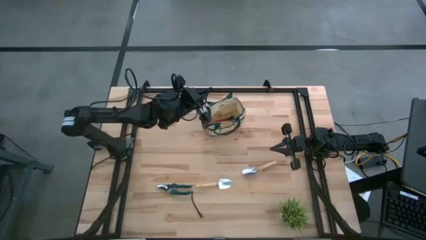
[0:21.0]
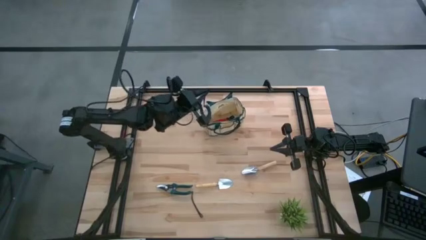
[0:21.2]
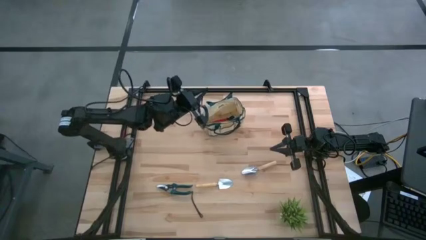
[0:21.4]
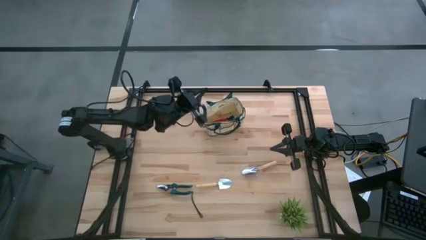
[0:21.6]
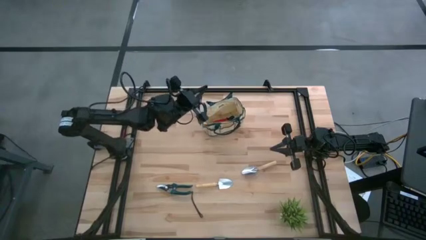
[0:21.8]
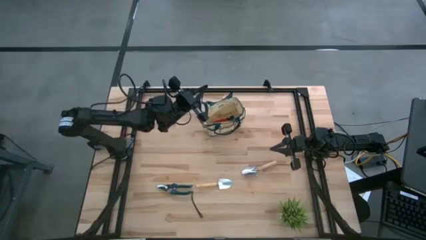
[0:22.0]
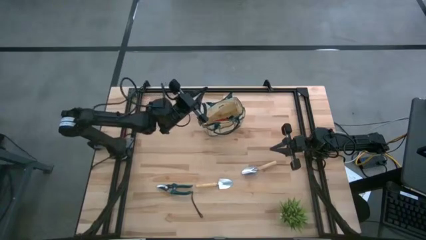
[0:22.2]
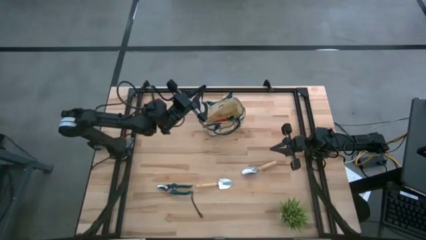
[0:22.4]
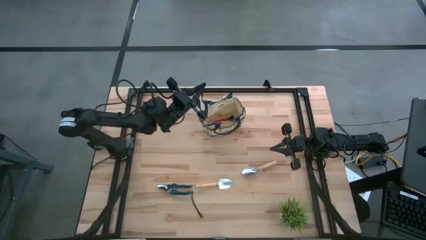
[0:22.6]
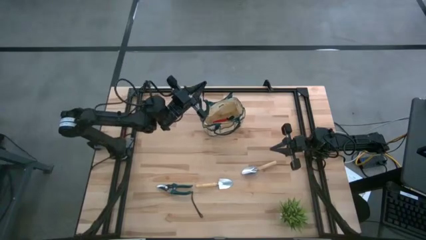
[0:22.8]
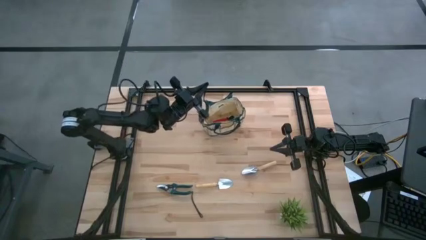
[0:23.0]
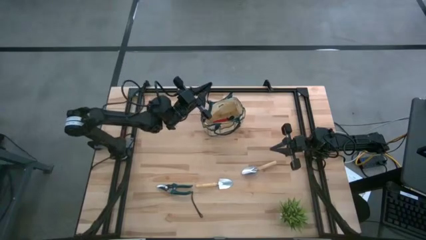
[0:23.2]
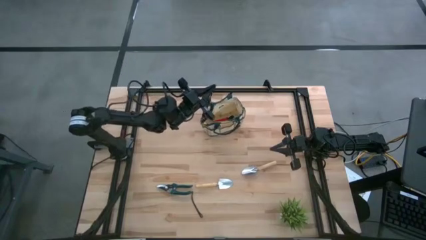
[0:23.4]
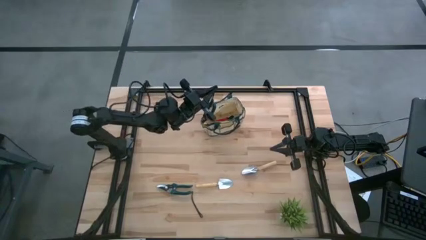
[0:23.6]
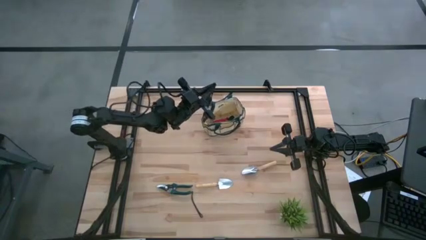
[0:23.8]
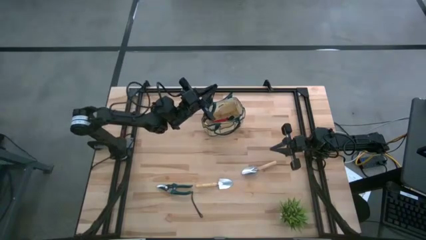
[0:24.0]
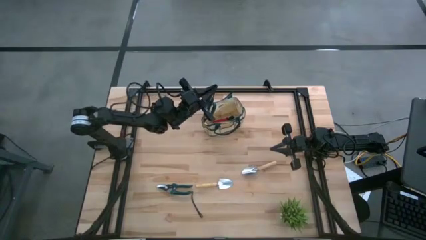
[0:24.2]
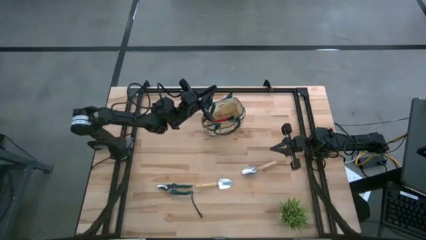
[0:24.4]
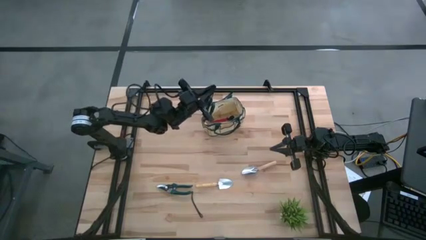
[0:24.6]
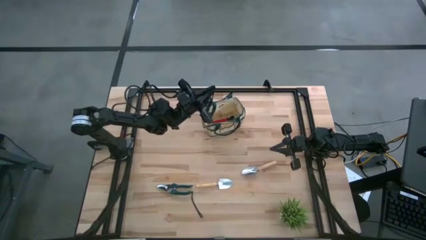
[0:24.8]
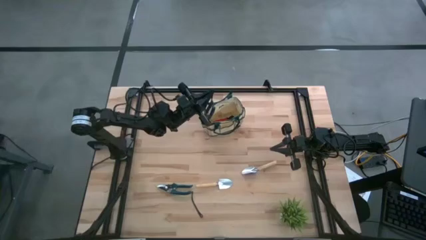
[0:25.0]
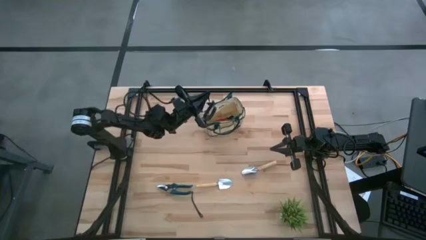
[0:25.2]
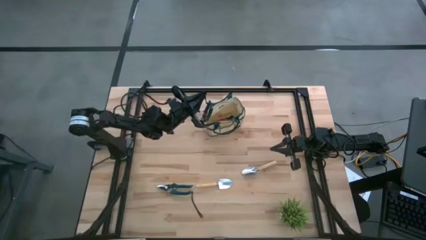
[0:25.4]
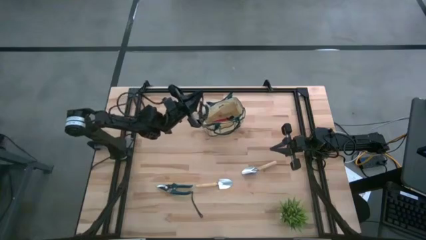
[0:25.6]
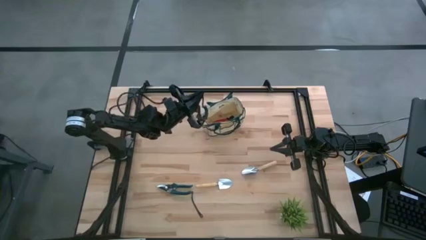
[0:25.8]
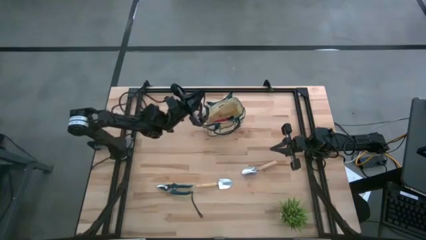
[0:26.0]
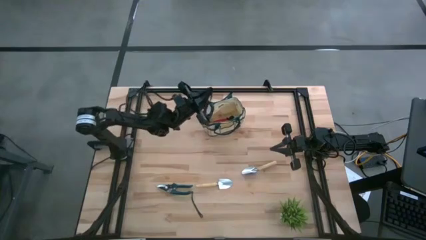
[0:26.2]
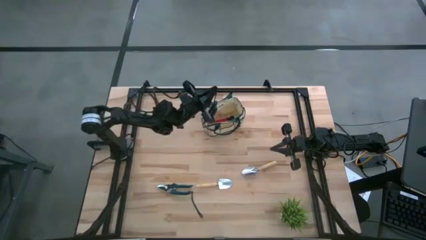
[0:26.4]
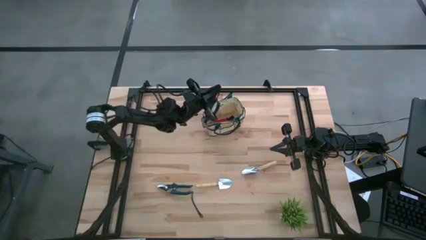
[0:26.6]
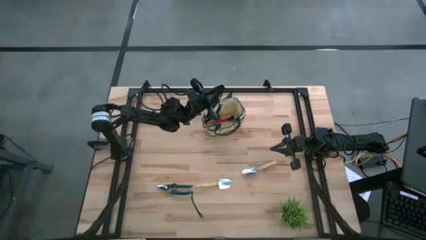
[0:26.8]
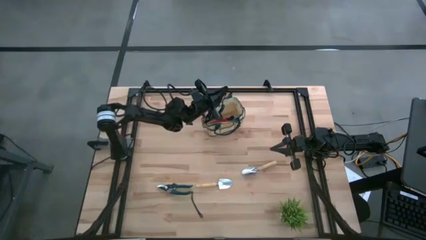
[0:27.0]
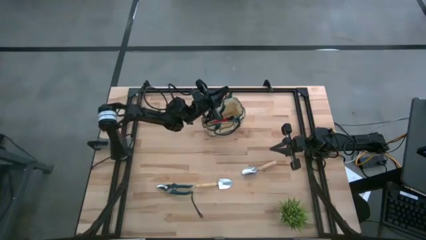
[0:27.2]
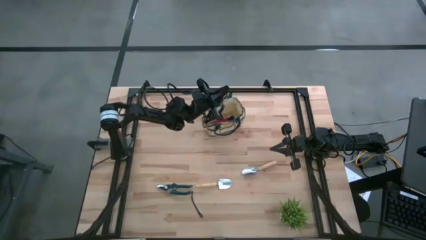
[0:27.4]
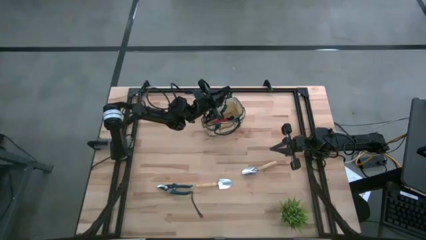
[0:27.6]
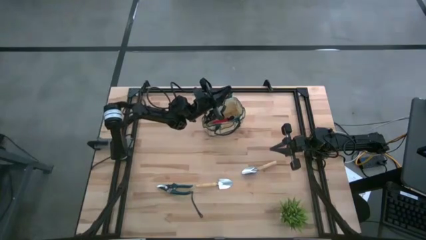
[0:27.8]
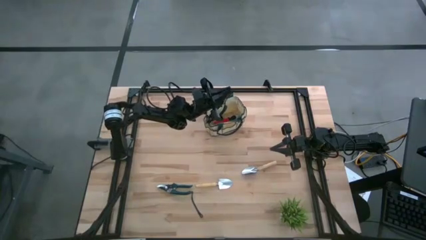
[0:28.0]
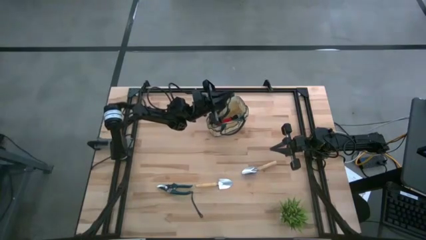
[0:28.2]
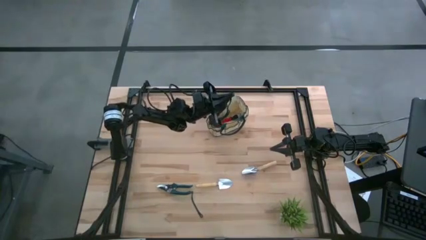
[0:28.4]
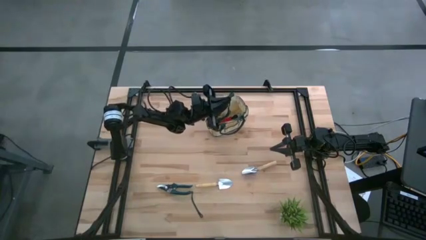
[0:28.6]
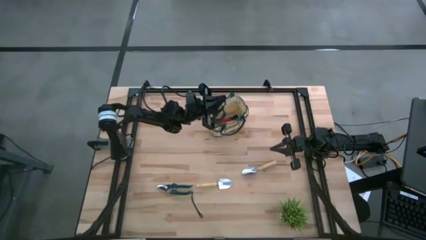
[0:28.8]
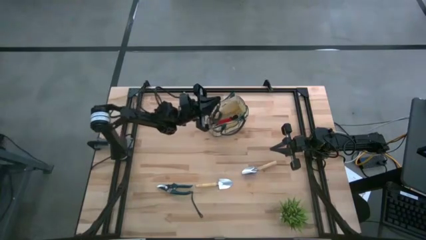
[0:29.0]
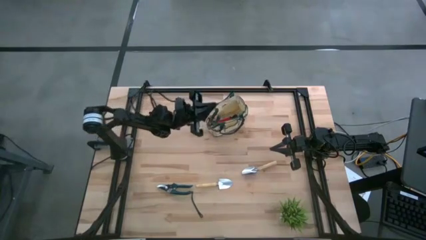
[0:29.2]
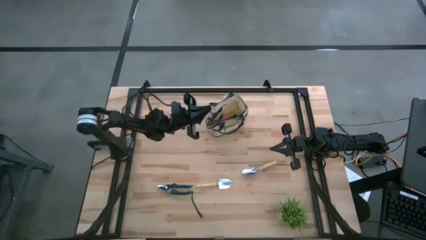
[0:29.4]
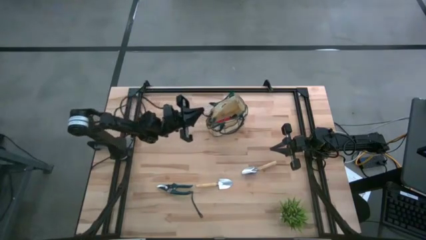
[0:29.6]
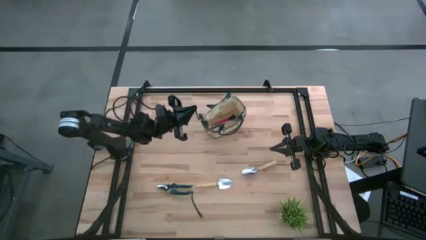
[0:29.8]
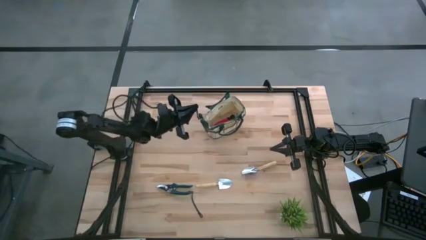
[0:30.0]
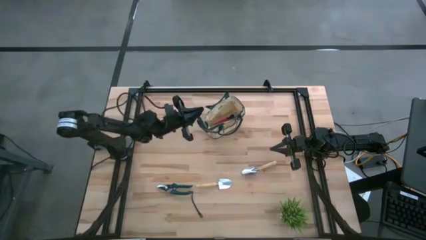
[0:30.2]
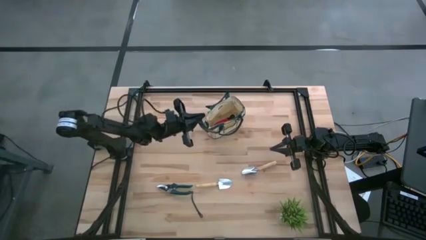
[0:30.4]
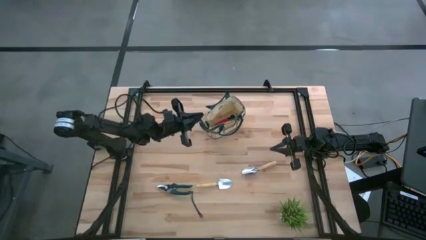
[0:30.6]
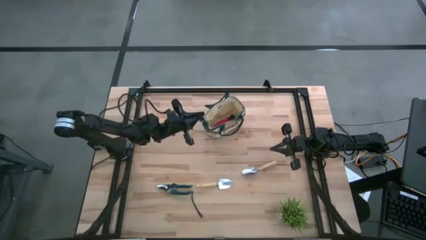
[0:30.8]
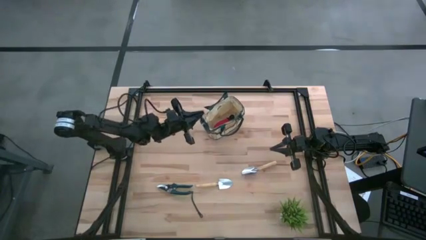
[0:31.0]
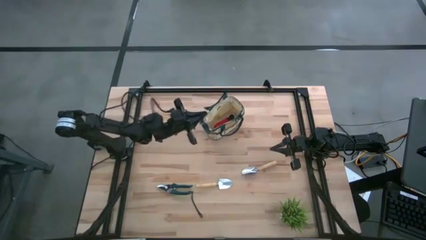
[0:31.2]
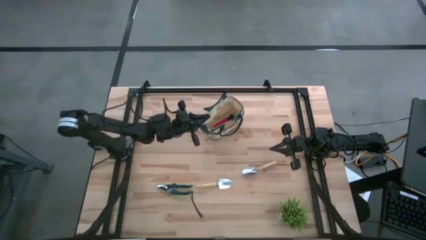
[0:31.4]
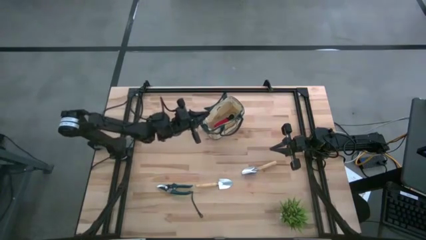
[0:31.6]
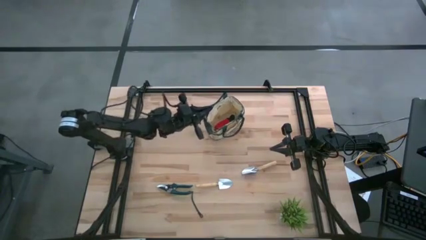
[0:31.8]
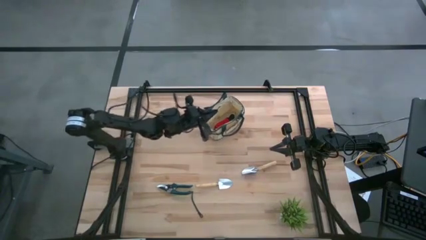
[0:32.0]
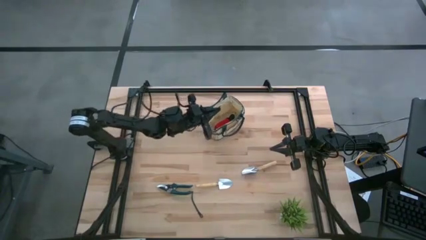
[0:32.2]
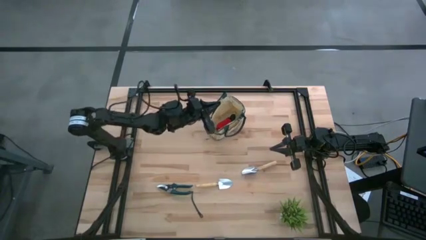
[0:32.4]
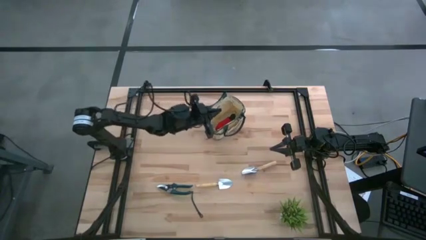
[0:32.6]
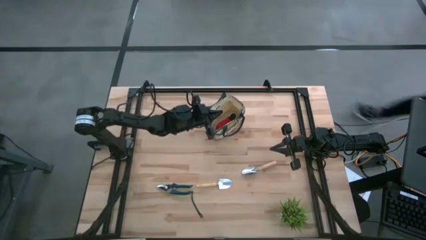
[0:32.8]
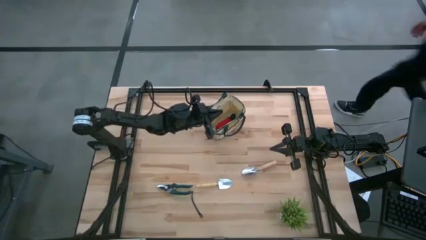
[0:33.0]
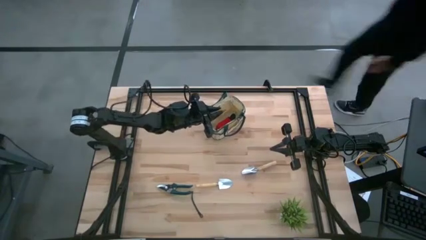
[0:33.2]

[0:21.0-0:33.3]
Task: Pick & Place Garden tools in Gardening bag
Put the top right shear scissors into the gardening bag

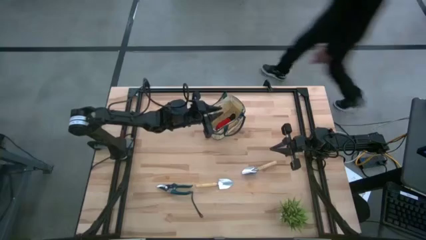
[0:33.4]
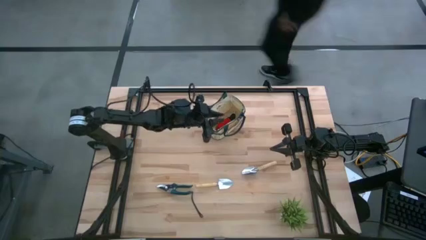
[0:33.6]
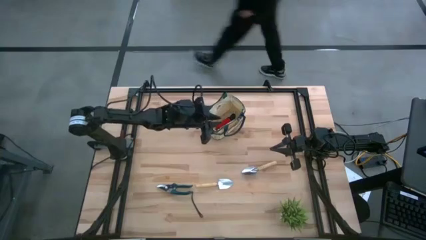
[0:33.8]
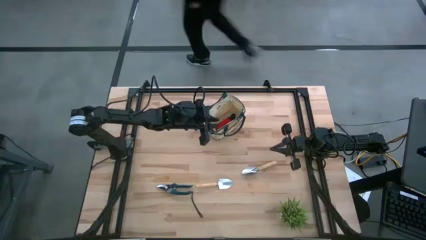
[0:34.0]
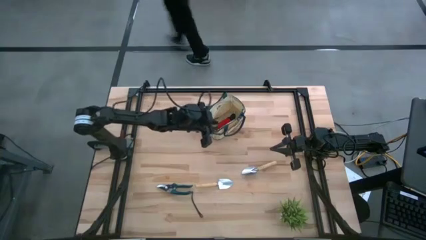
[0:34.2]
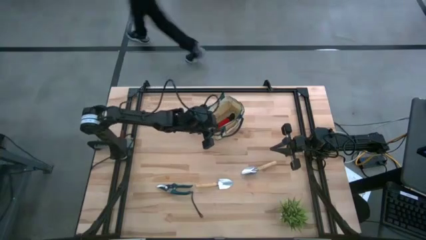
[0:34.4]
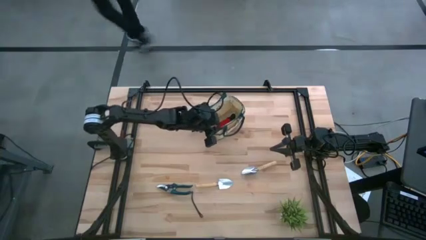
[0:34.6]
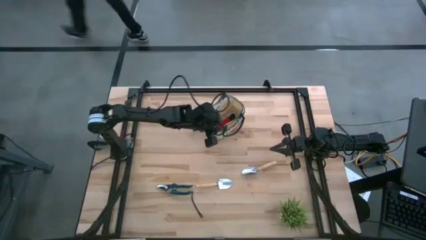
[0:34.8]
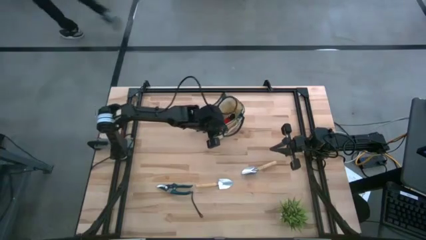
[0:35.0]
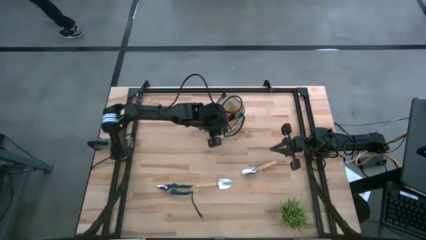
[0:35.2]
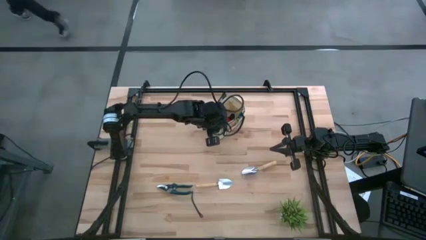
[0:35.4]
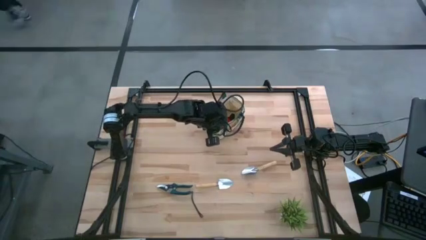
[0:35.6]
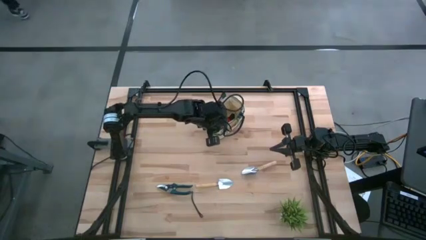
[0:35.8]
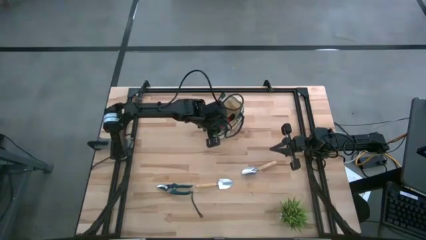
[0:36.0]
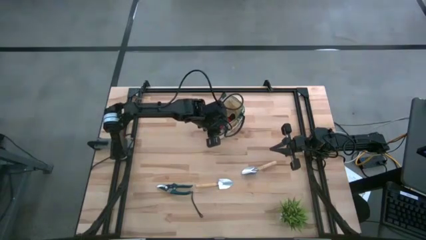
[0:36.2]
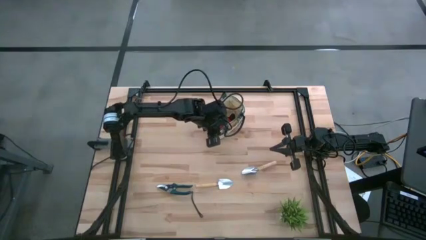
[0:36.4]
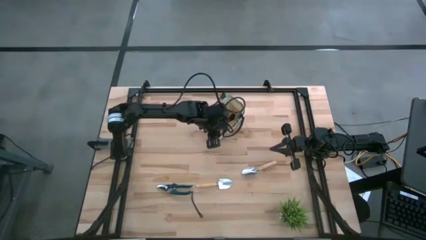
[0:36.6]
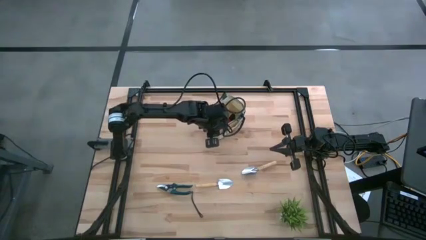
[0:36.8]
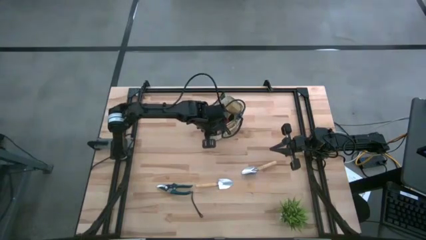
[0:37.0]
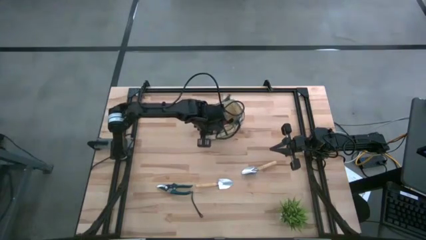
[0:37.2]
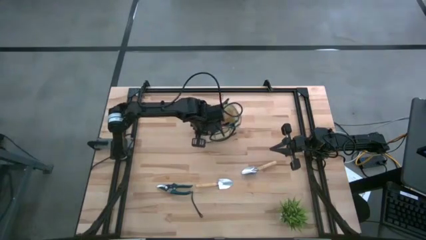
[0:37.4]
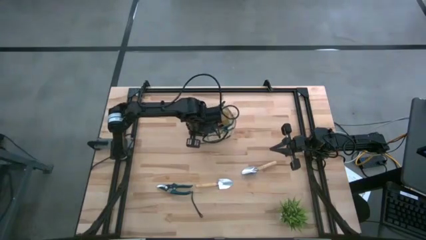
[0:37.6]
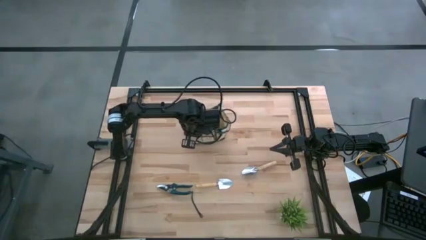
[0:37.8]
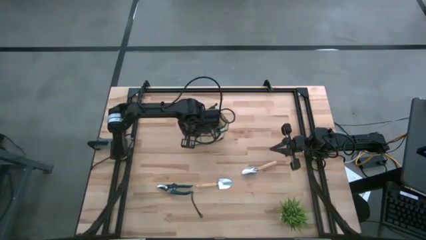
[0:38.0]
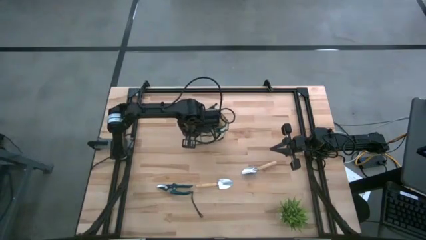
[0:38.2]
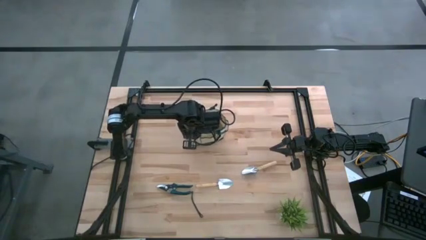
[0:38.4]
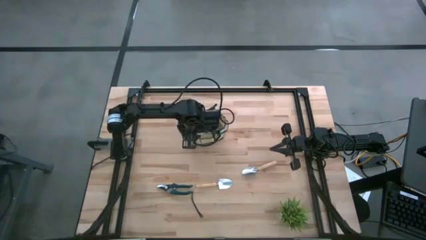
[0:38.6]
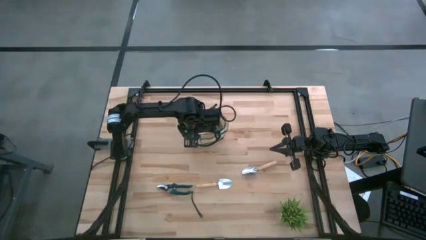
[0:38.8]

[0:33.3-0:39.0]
Adjust the gardening bag
